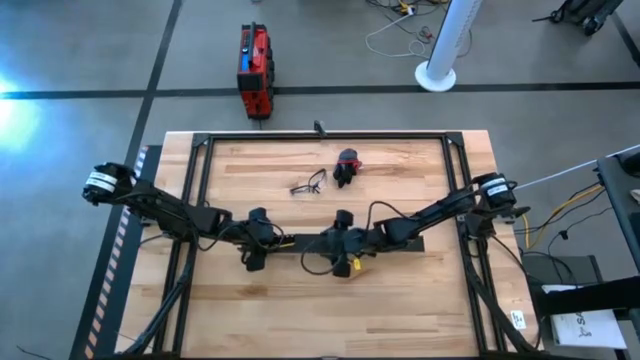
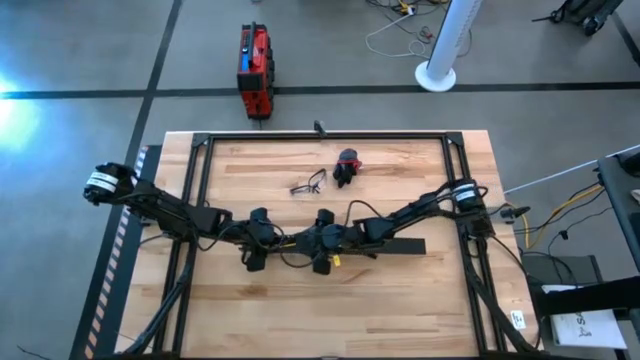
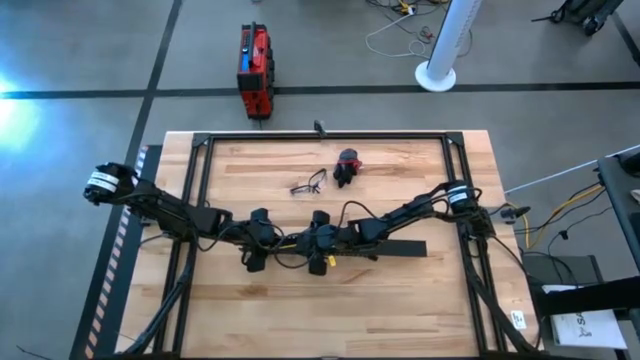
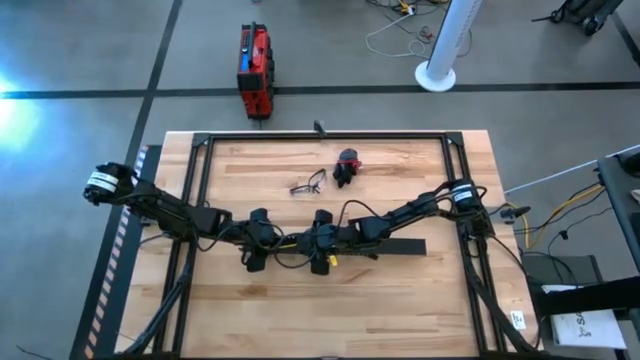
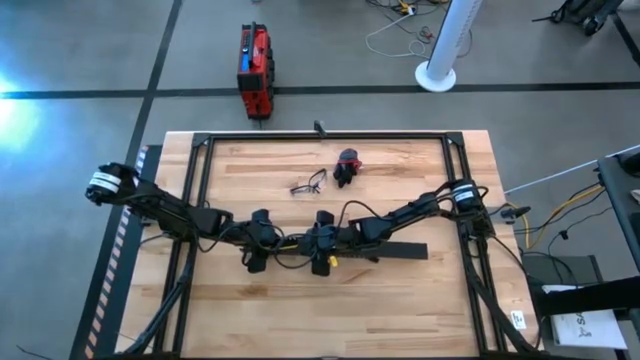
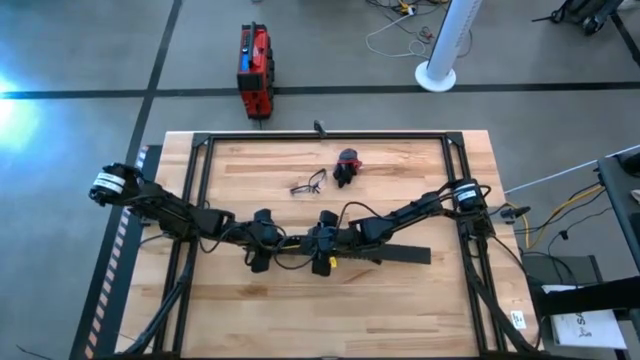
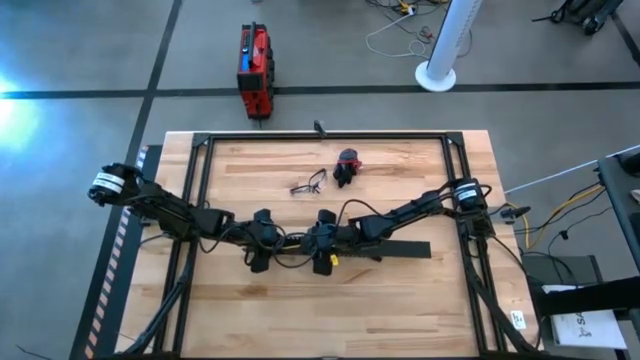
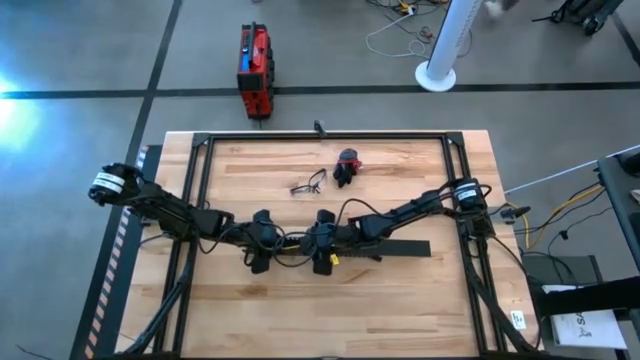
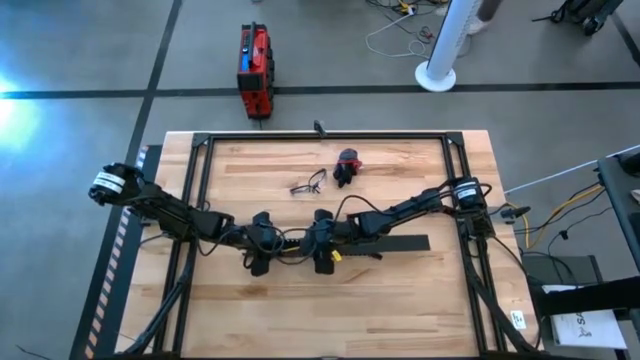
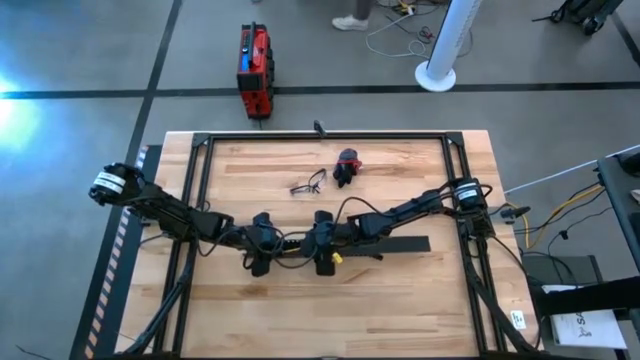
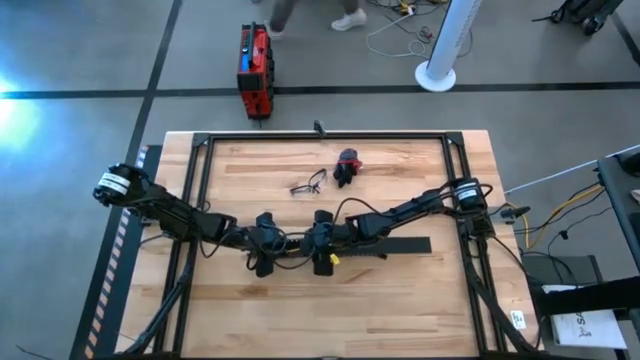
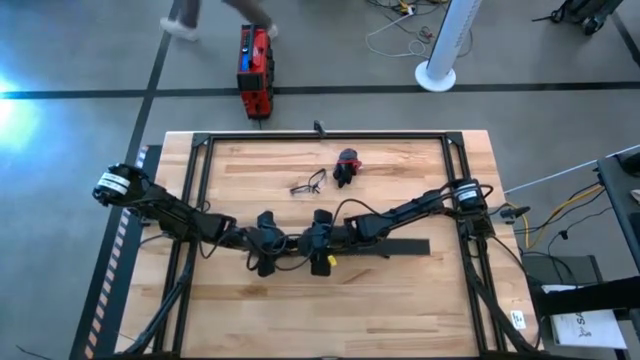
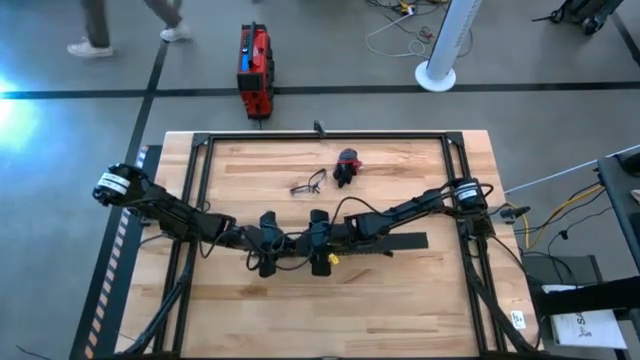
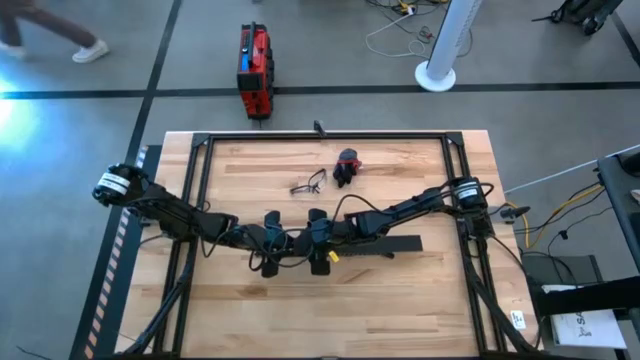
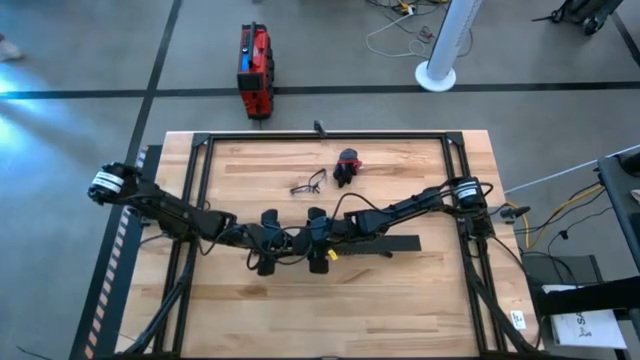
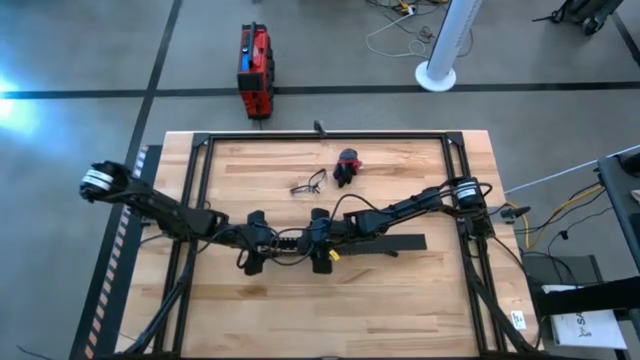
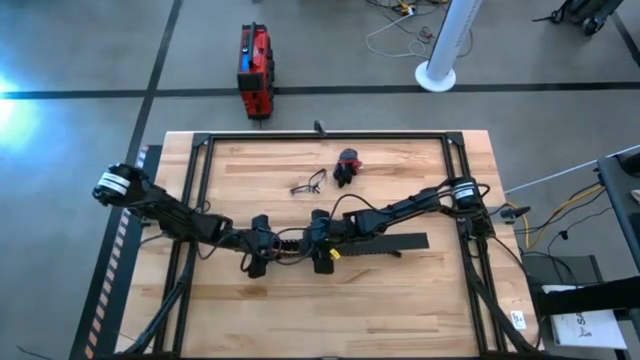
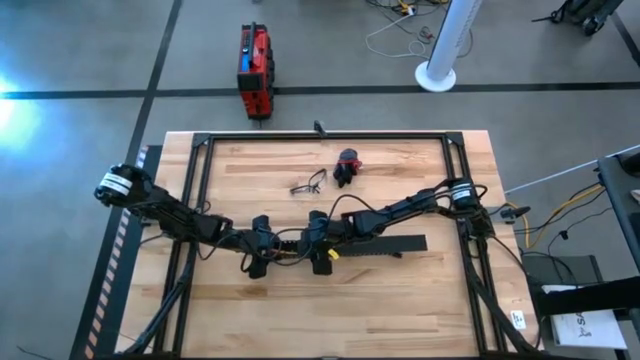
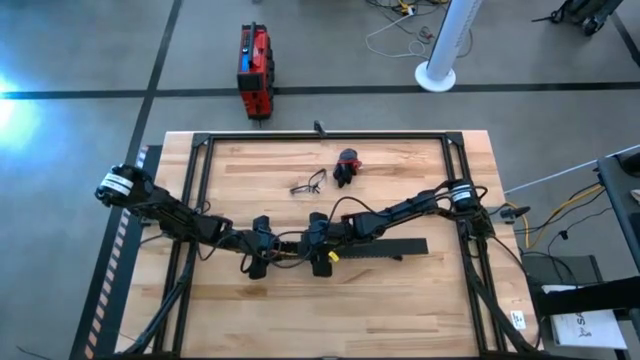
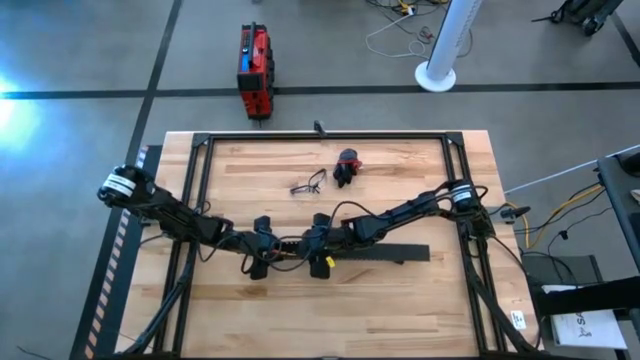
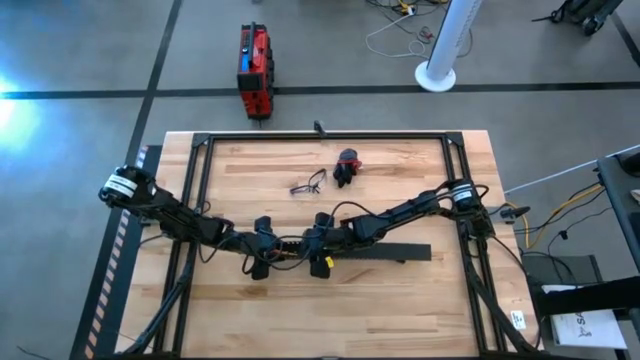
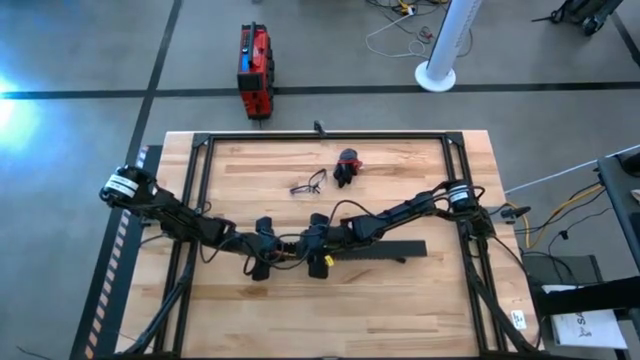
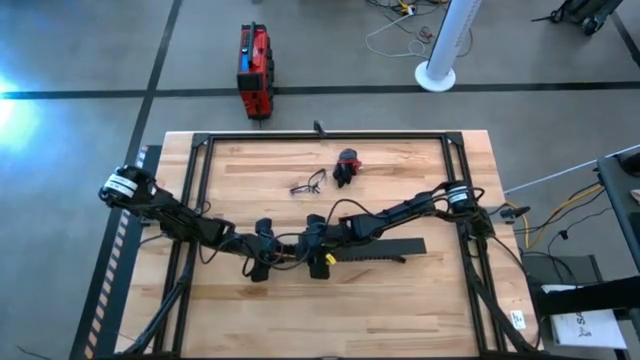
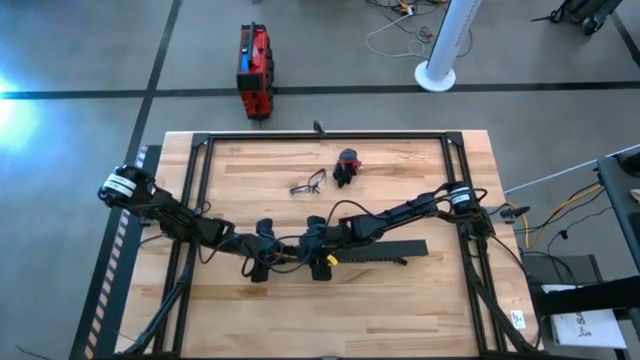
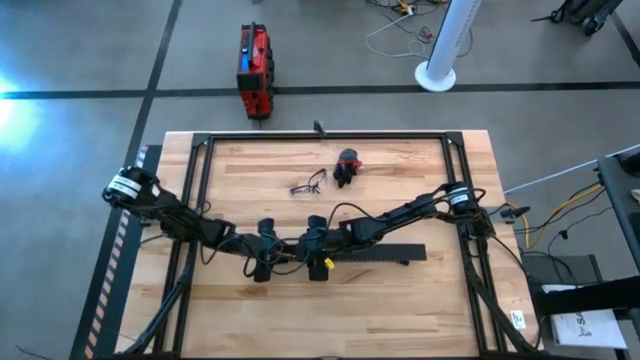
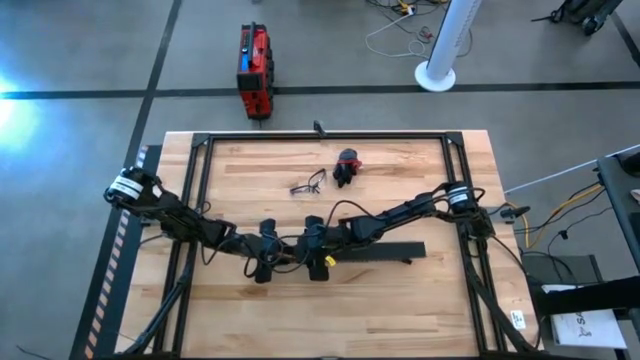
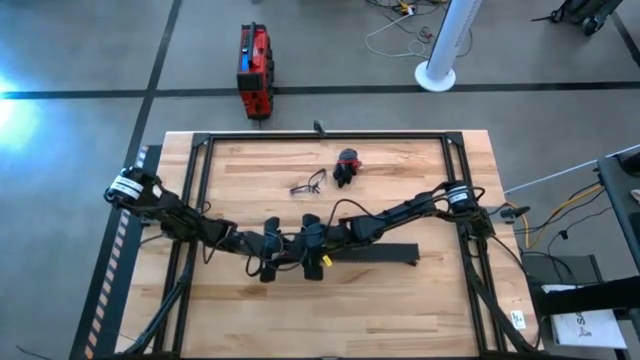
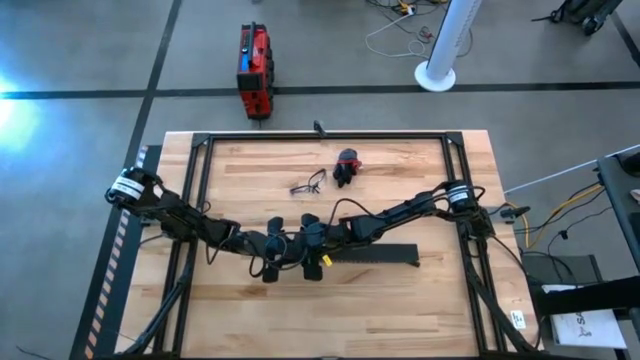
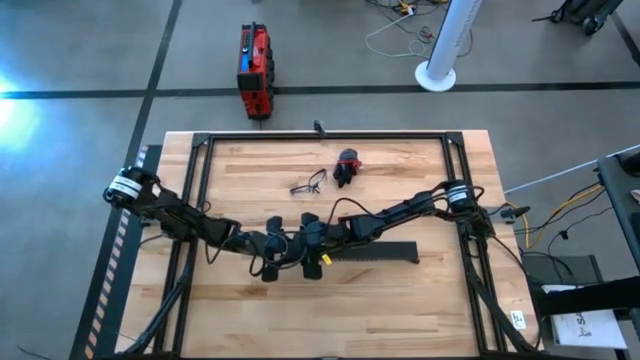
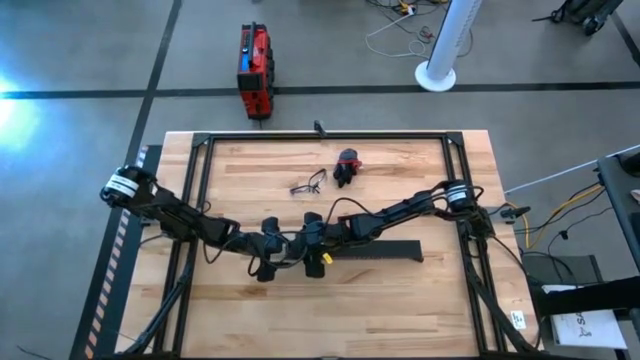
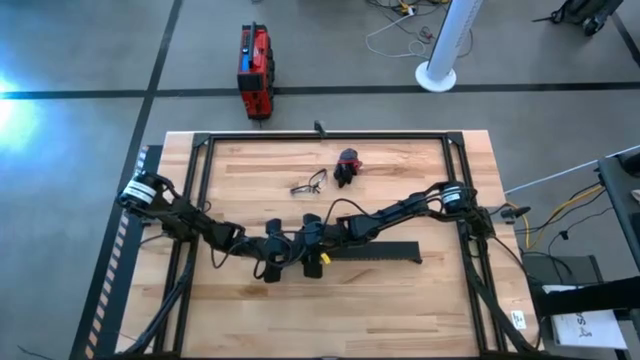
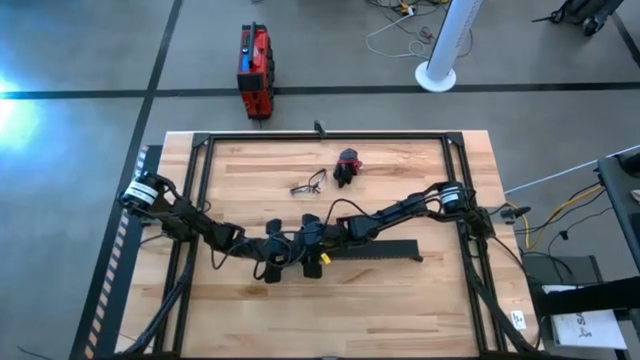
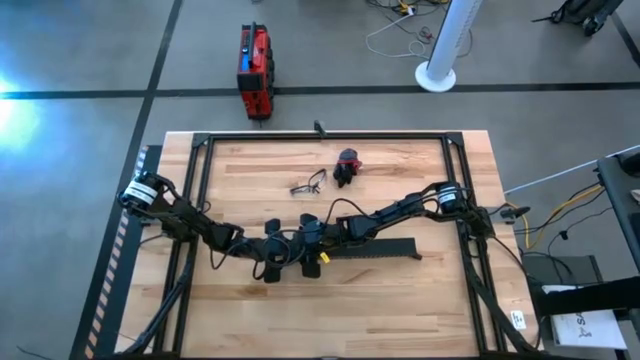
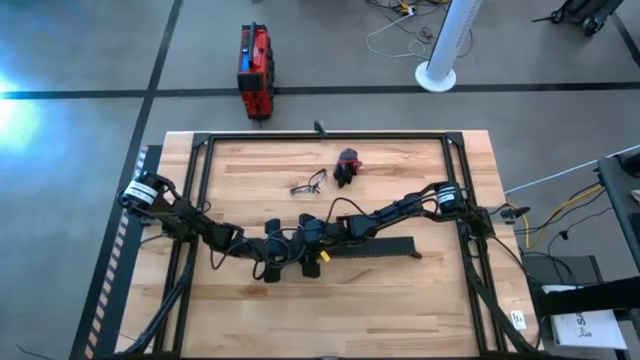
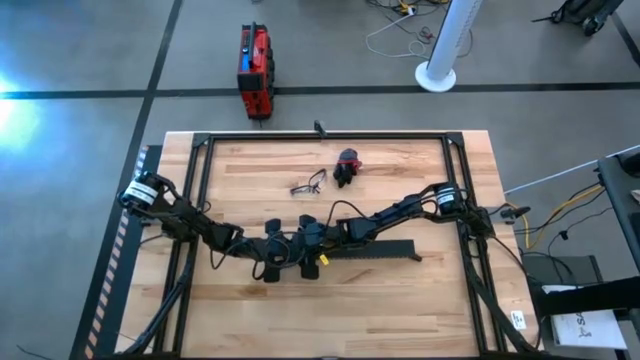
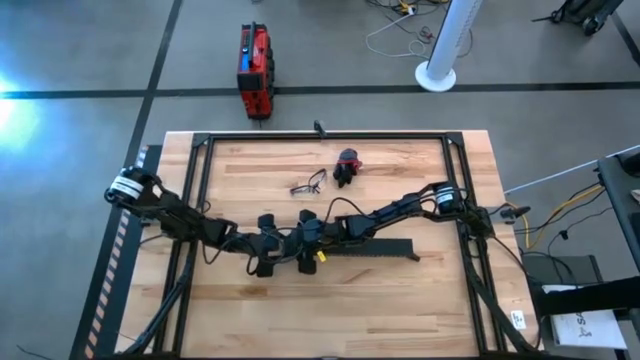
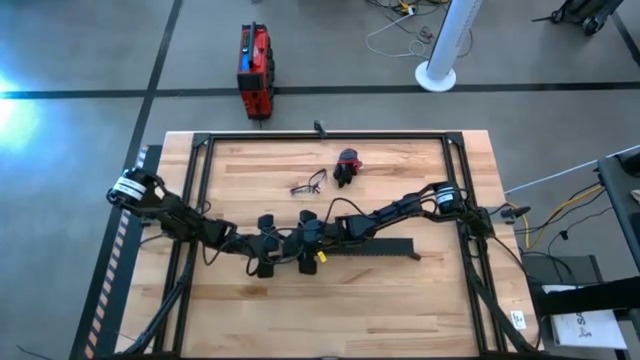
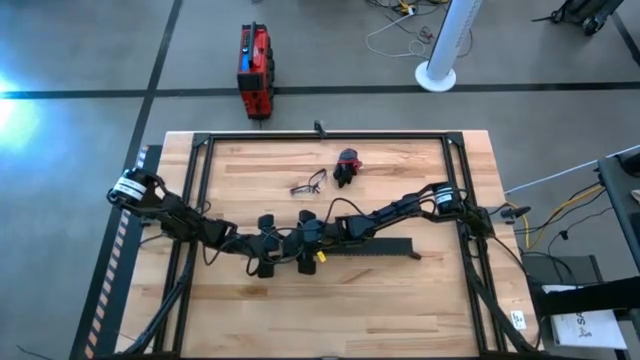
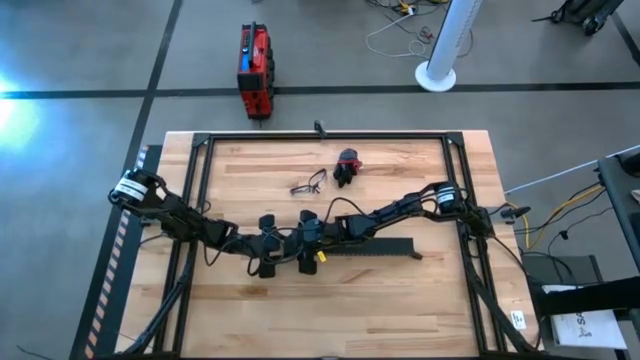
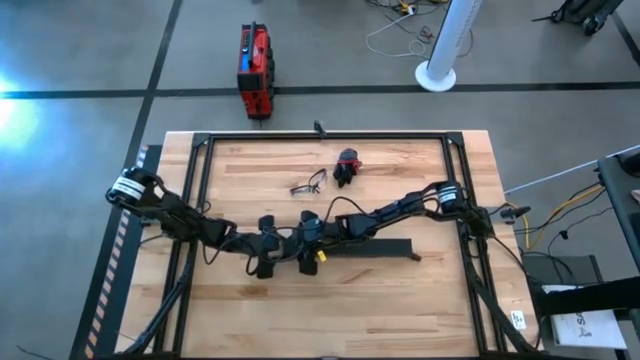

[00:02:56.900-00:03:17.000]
Task: Ziptie cables
Close the black cable duct lid

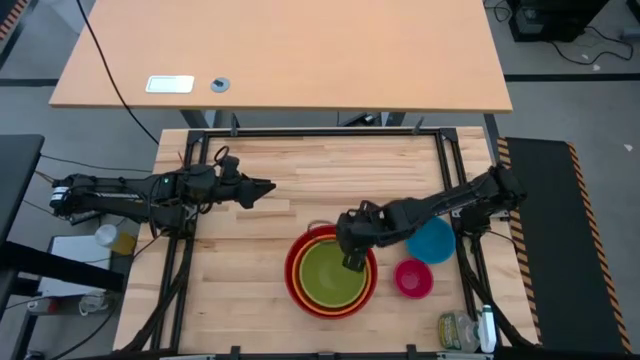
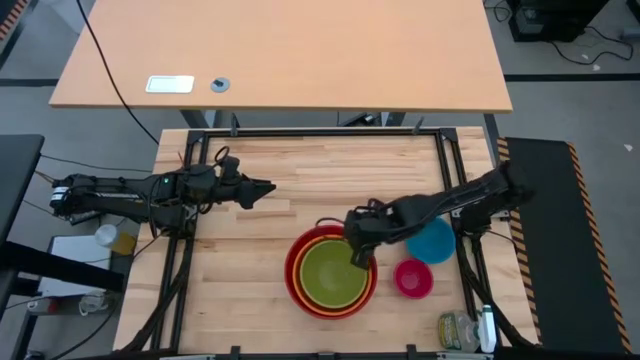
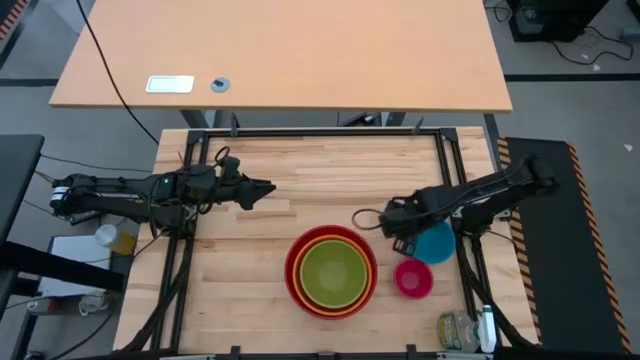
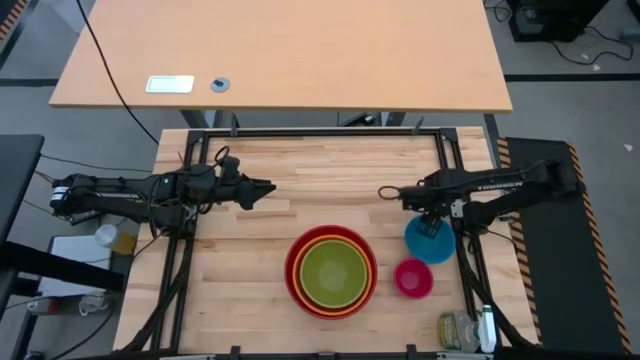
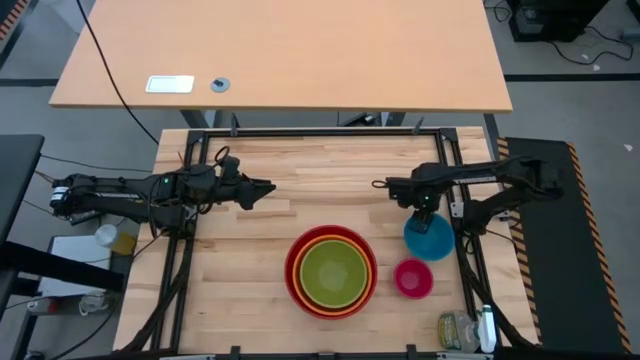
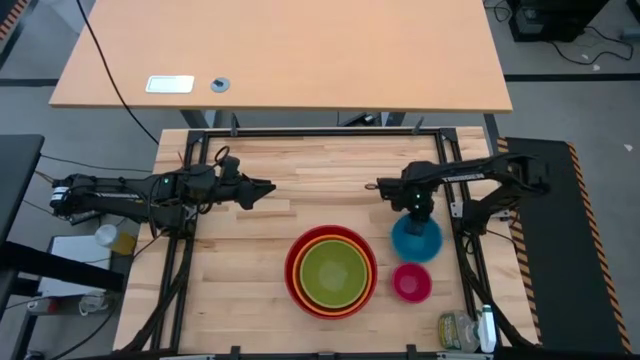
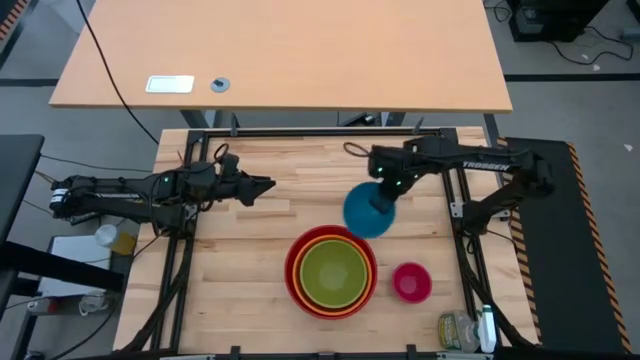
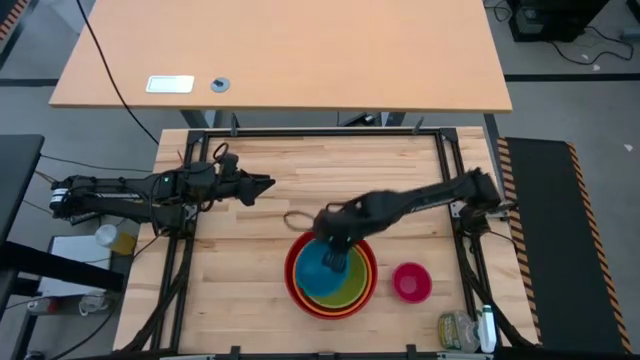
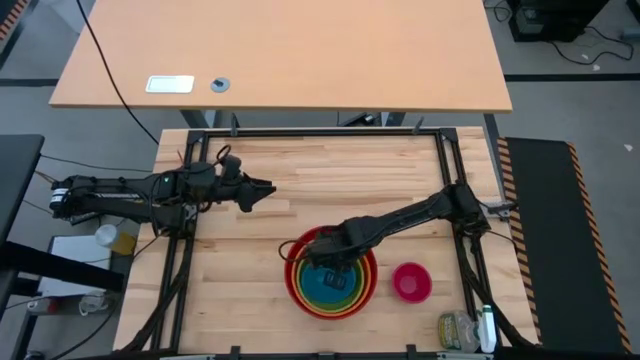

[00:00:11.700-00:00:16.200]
Task: Nest bowls inside each other by size order
Stack the blue bowl on top of the green bowl
